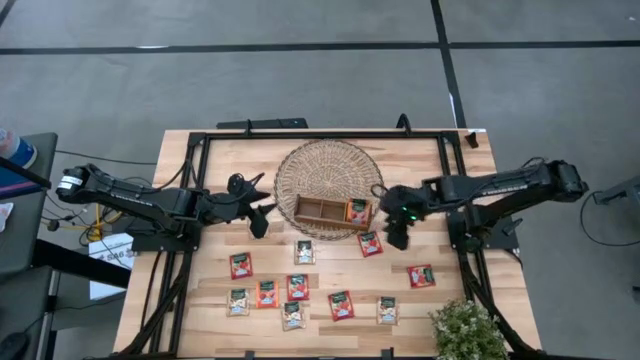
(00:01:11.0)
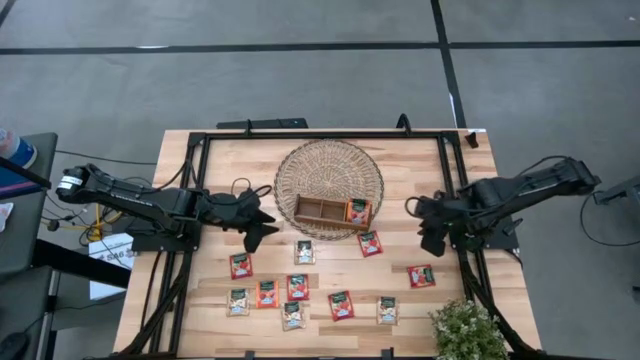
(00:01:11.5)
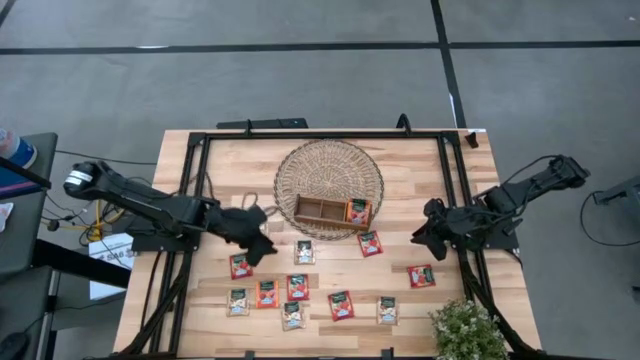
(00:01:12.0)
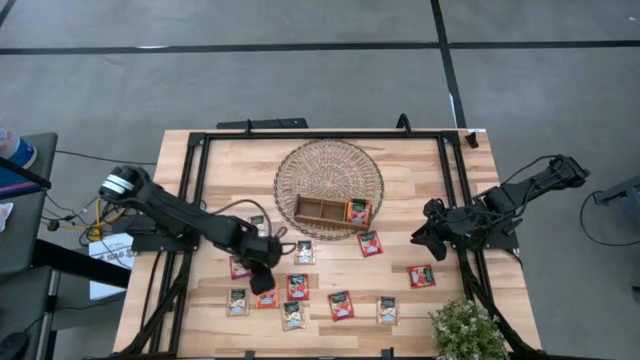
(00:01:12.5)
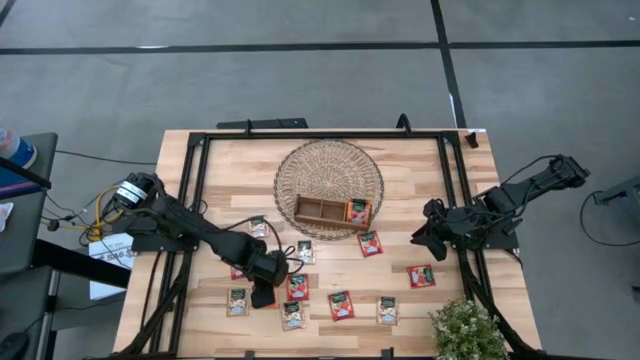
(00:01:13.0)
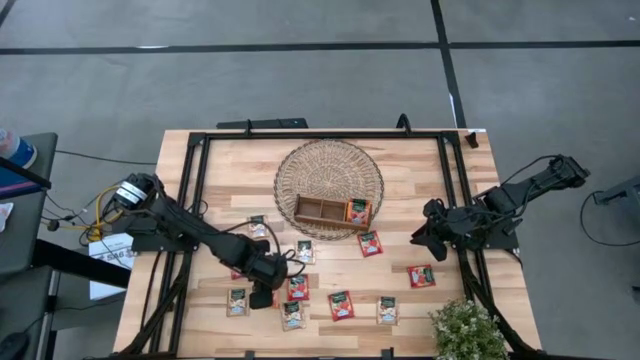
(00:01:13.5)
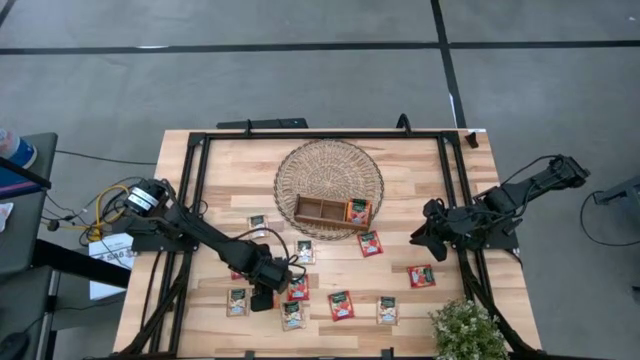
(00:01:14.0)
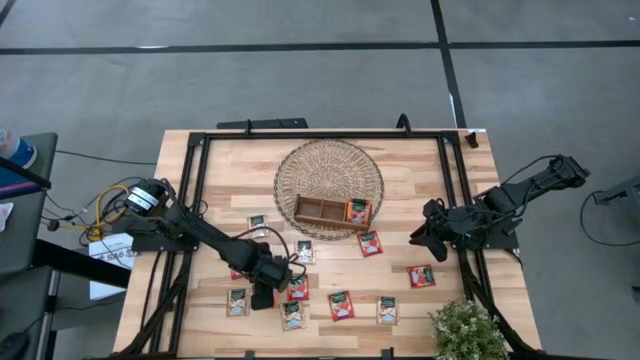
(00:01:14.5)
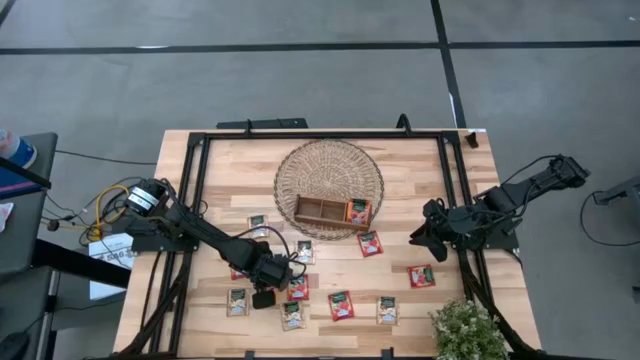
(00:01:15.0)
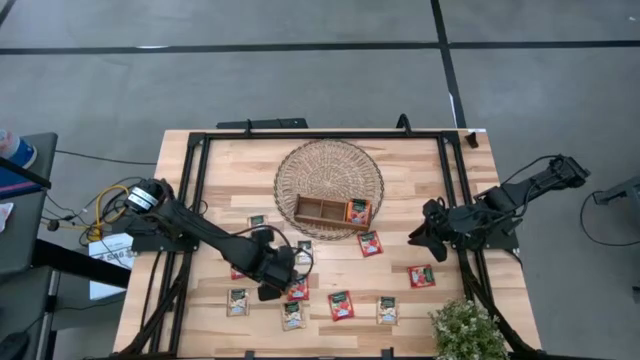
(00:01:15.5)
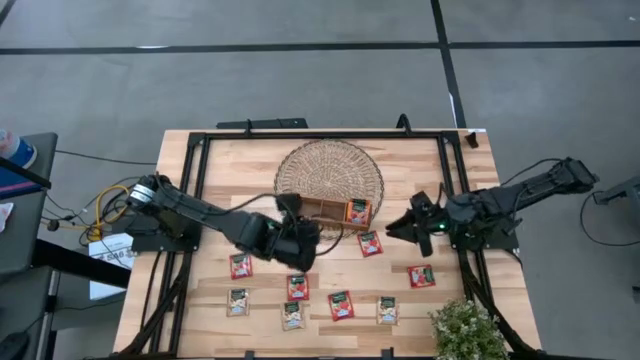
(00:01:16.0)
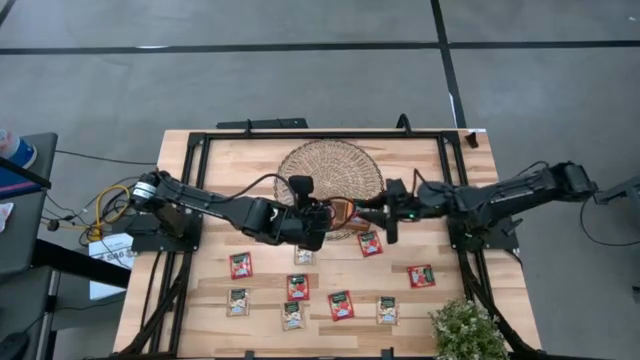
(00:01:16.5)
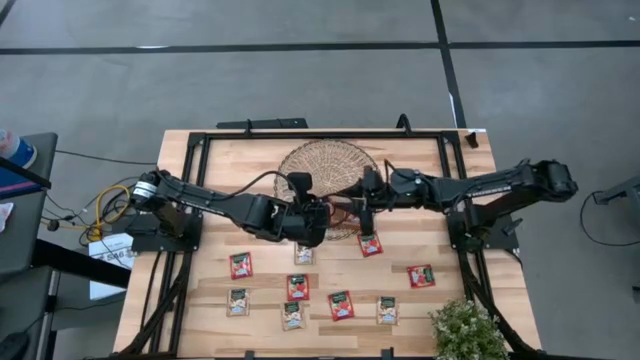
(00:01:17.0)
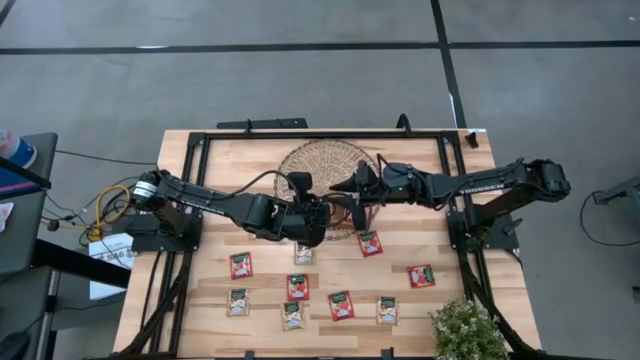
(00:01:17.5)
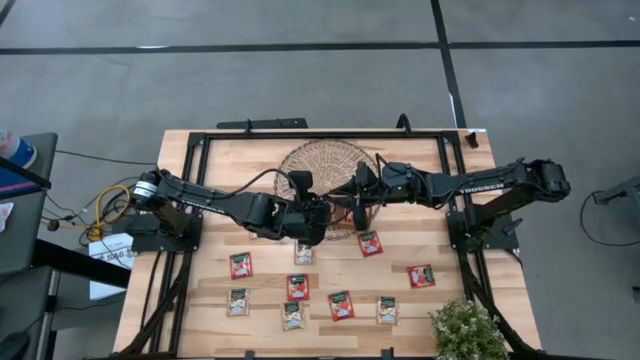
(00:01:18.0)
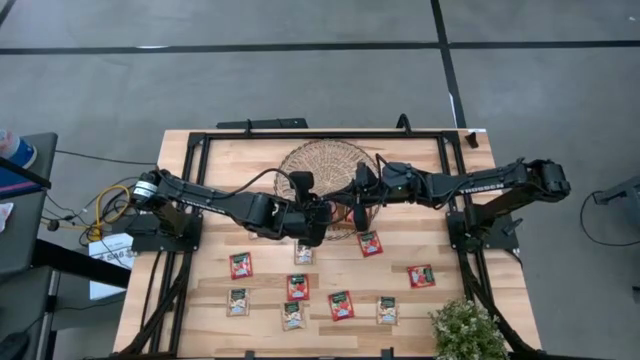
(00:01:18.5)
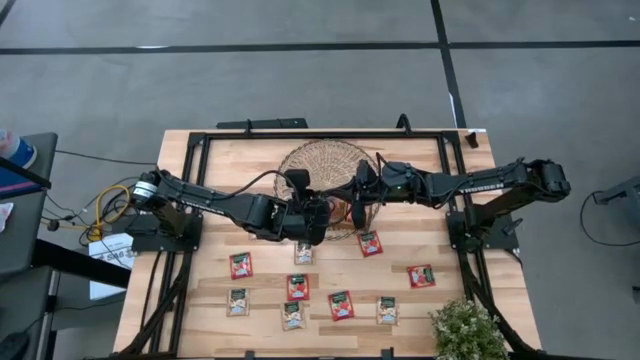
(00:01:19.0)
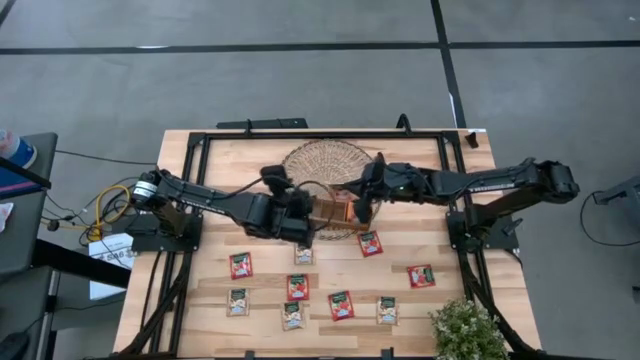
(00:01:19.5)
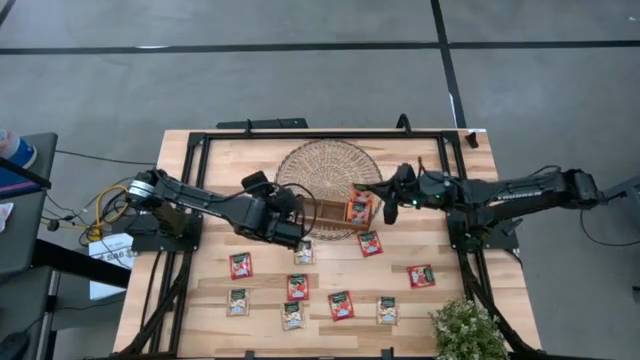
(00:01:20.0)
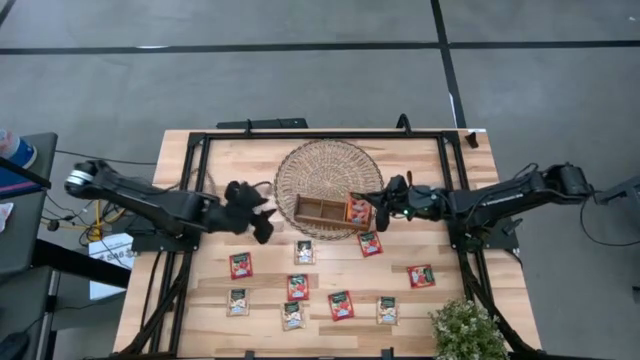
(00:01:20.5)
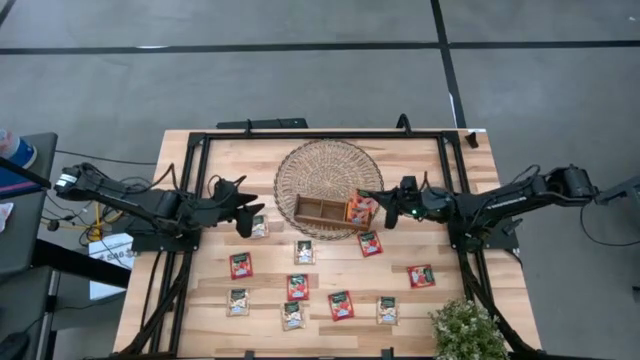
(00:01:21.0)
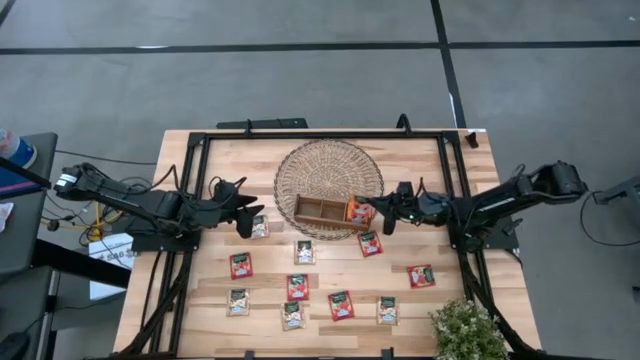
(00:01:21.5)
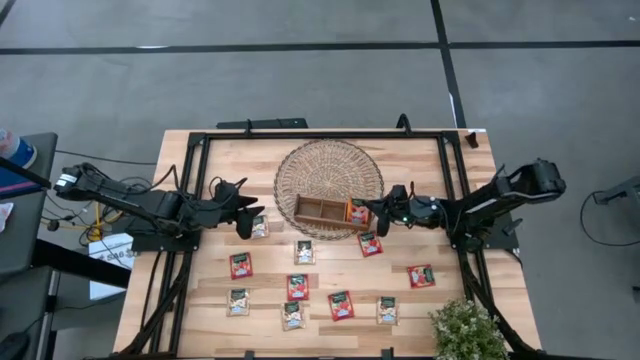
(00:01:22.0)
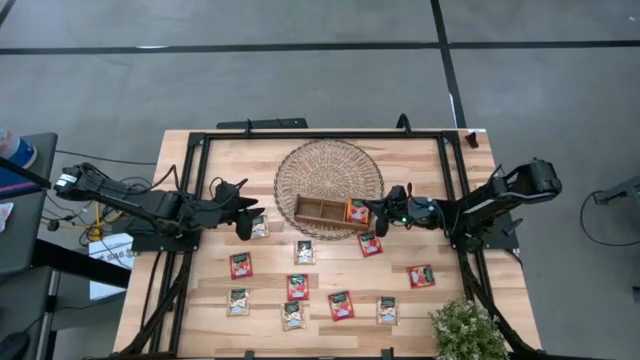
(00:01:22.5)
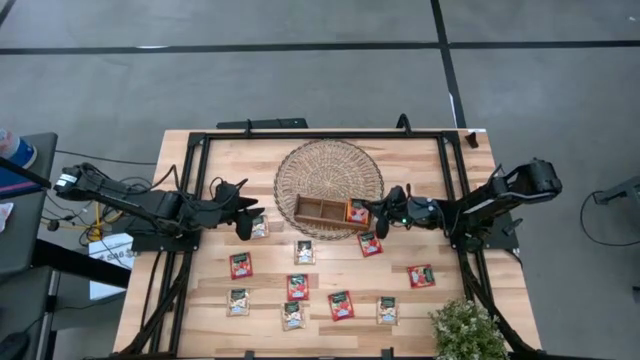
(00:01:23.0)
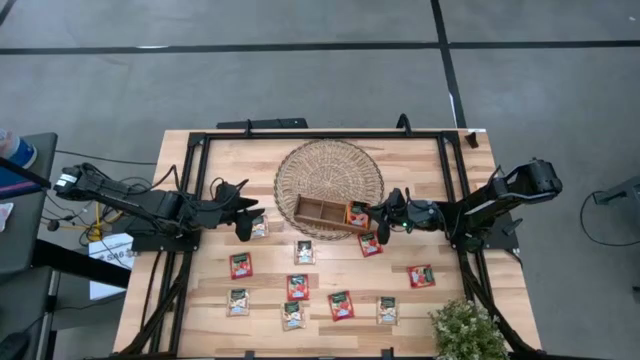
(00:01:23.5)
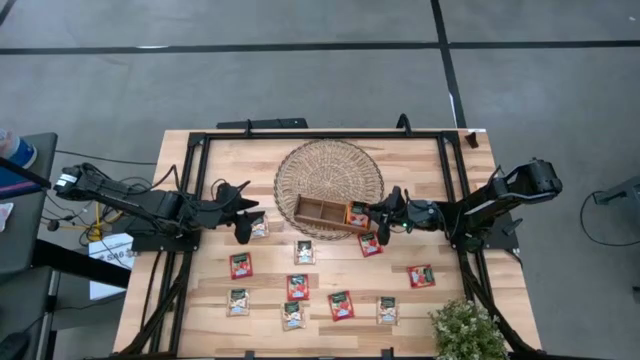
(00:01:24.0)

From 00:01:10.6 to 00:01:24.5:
Task: Pick & Place Tea
Put the orange tea bag into the right section of the wooden organizer

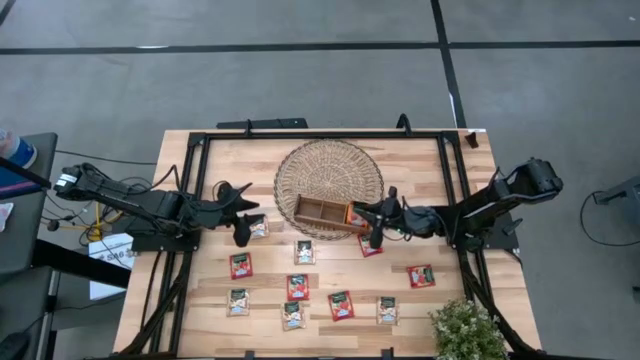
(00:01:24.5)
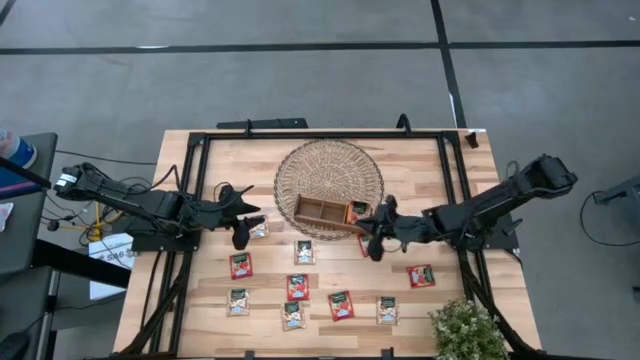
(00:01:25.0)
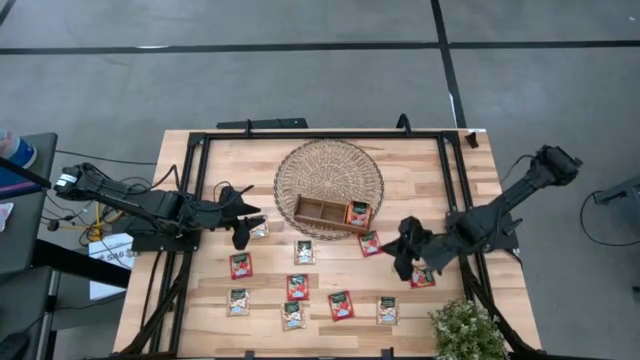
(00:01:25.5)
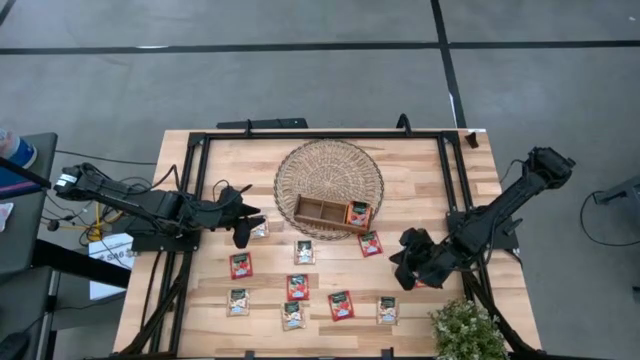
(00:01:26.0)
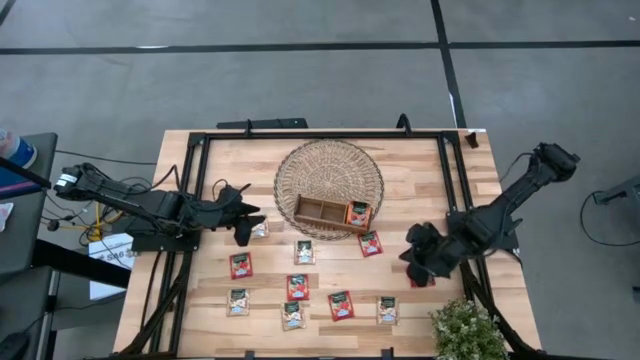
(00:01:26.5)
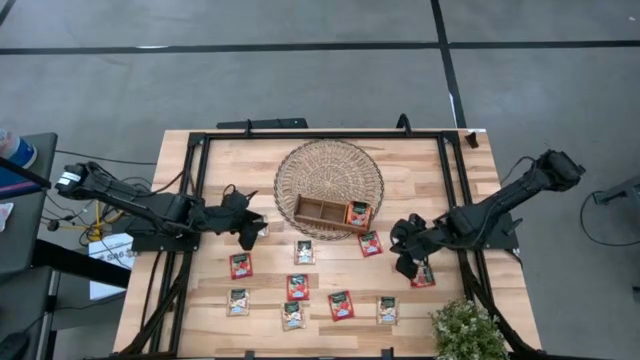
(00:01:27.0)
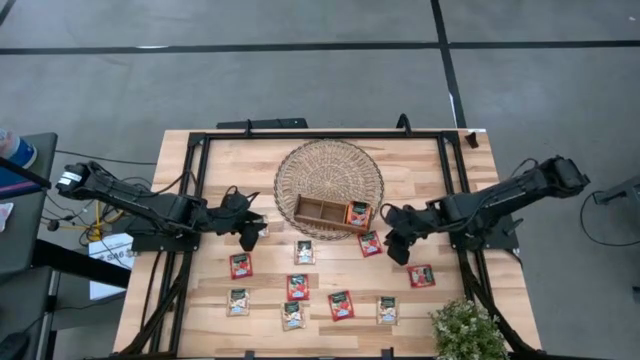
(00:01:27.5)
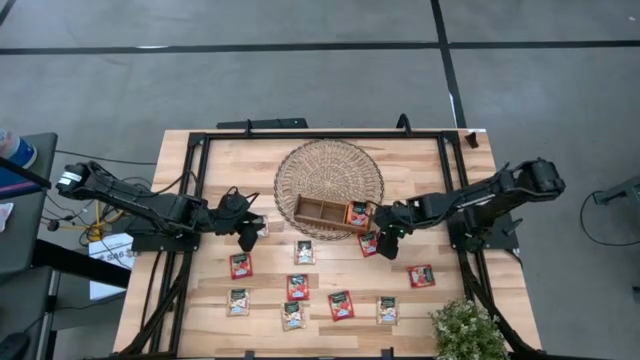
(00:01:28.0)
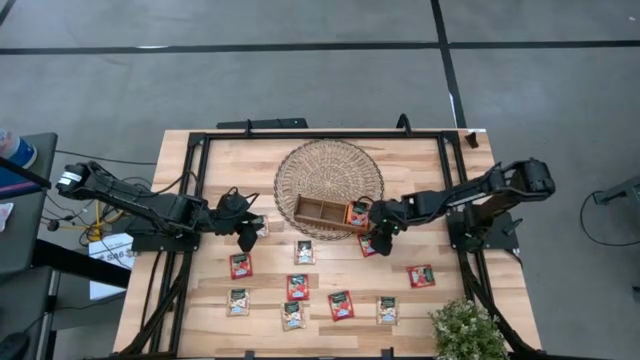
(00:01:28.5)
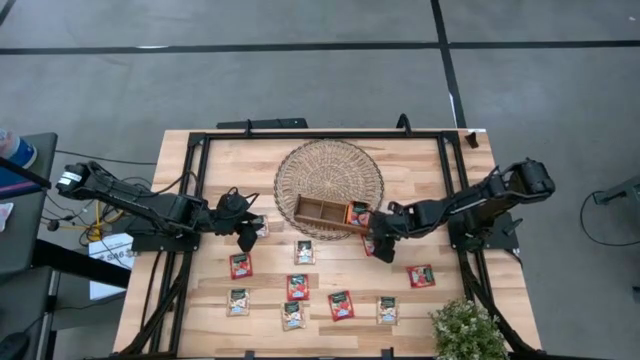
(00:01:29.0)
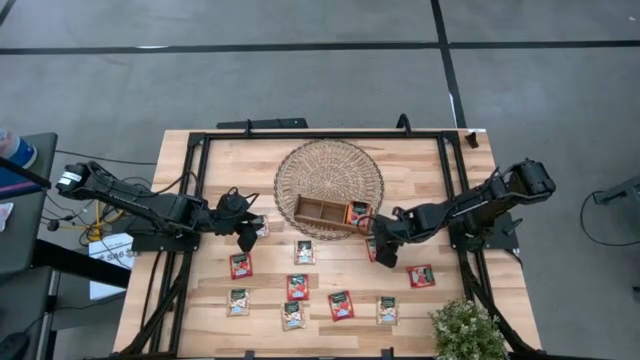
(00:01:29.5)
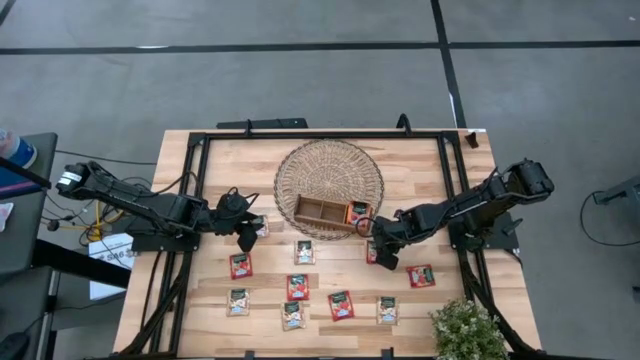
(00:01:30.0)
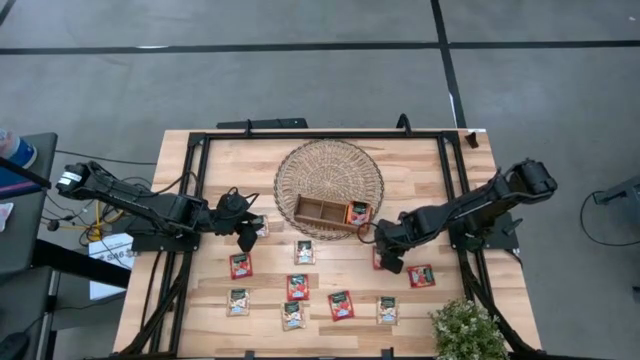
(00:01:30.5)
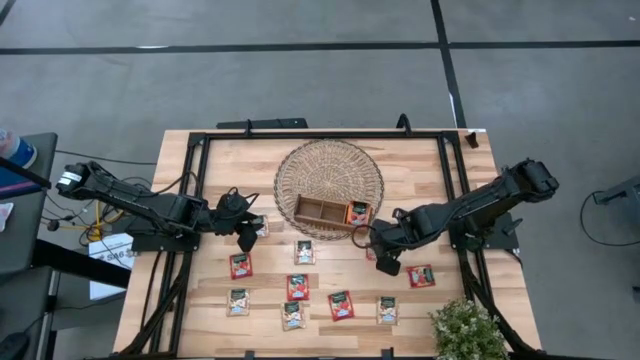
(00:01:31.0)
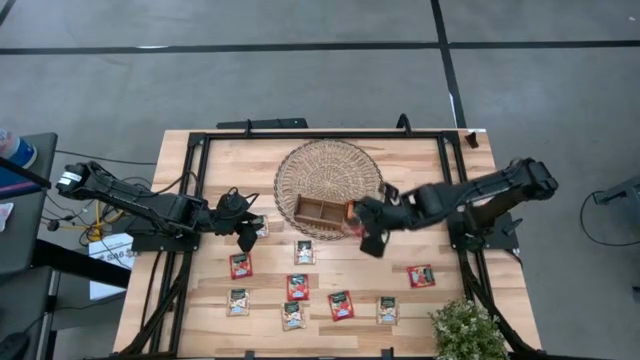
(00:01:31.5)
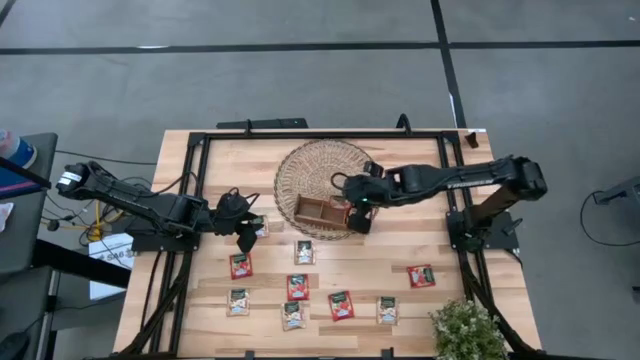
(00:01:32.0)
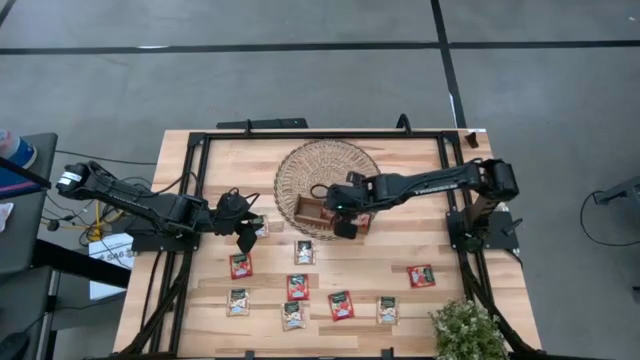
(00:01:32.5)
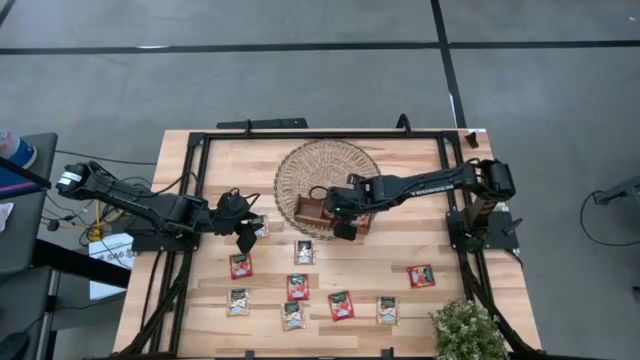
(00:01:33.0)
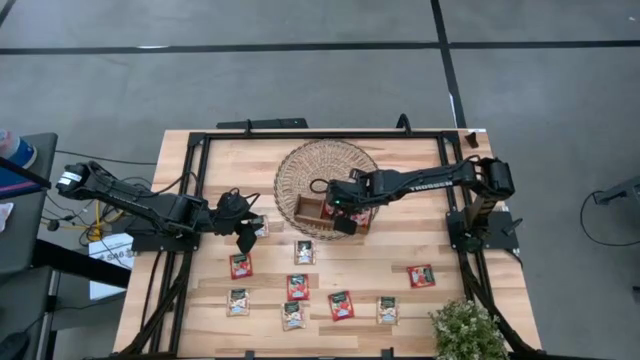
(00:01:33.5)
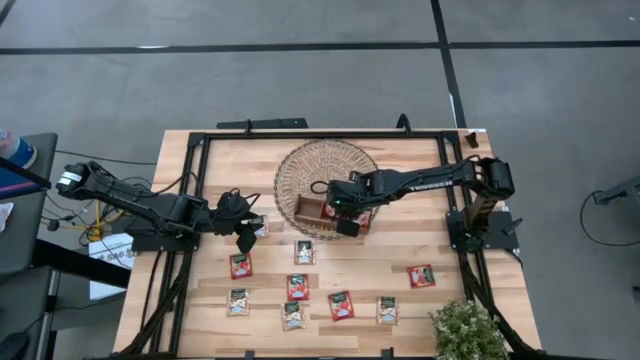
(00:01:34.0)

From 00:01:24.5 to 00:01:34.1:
Put the red tea bag into the middle section of the wooden organizer
